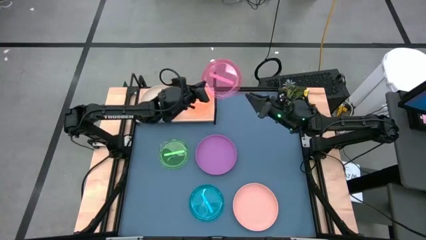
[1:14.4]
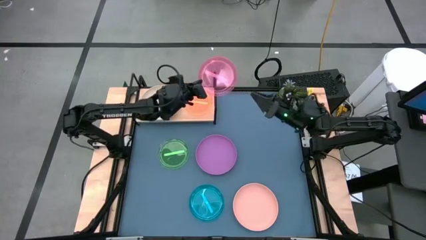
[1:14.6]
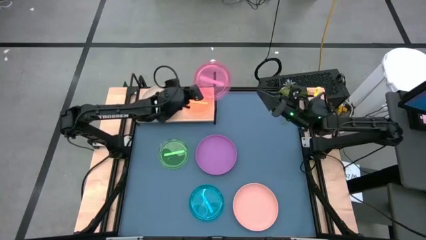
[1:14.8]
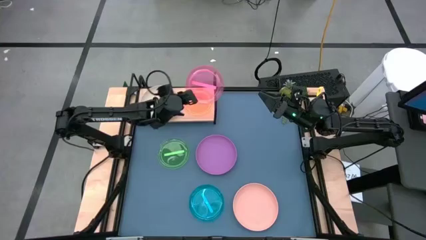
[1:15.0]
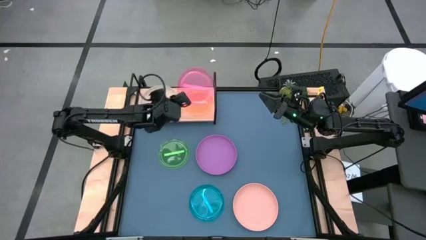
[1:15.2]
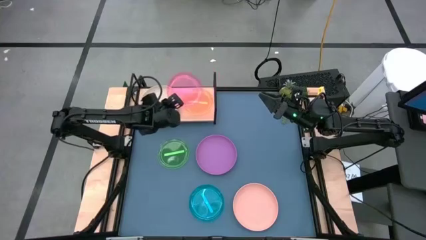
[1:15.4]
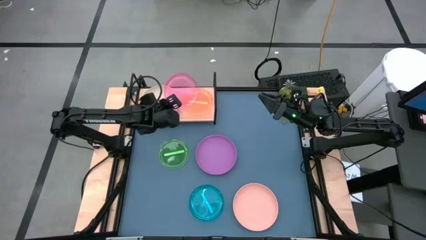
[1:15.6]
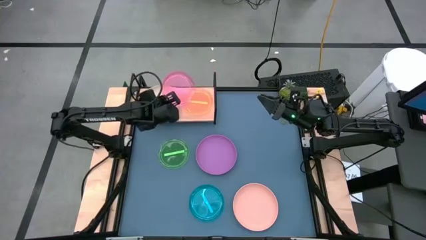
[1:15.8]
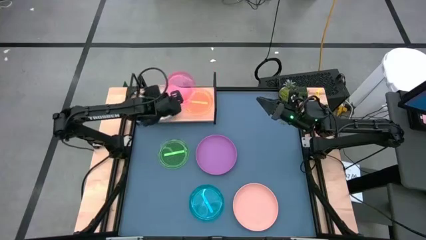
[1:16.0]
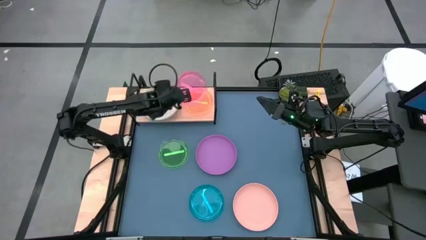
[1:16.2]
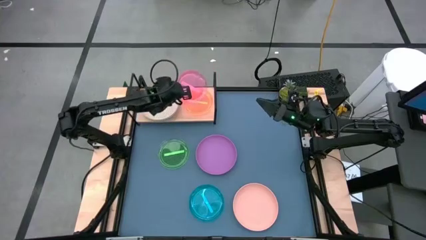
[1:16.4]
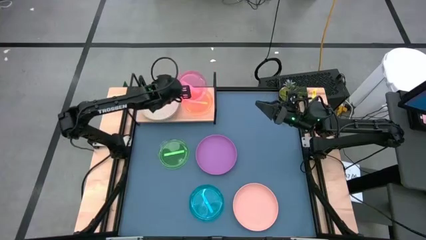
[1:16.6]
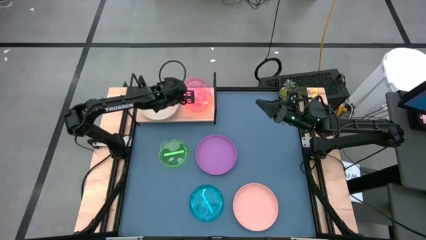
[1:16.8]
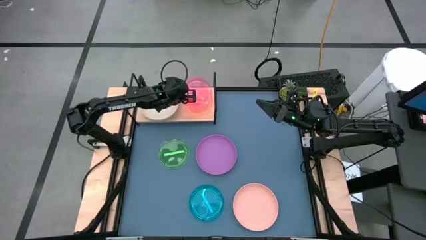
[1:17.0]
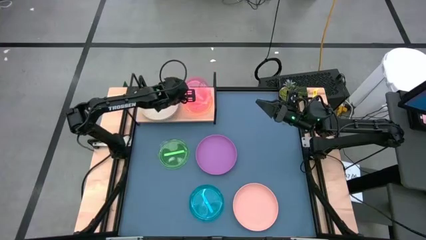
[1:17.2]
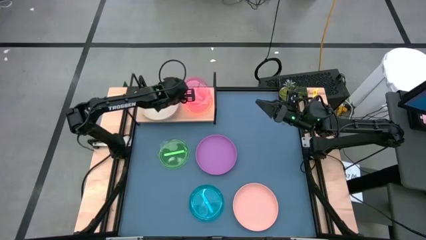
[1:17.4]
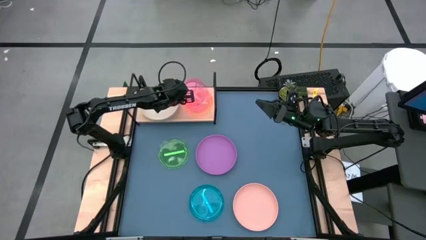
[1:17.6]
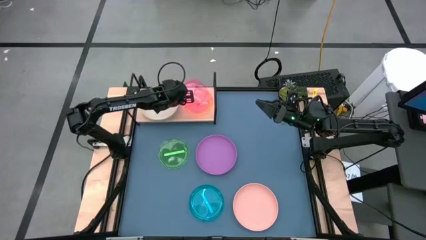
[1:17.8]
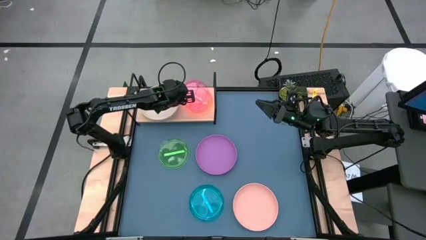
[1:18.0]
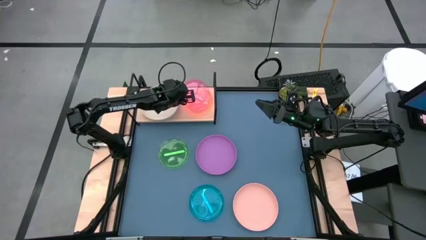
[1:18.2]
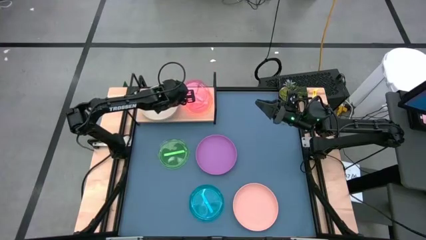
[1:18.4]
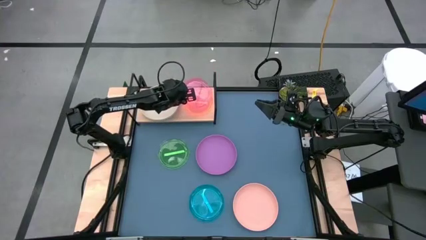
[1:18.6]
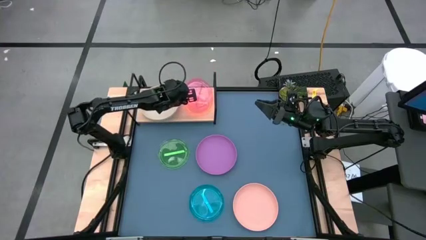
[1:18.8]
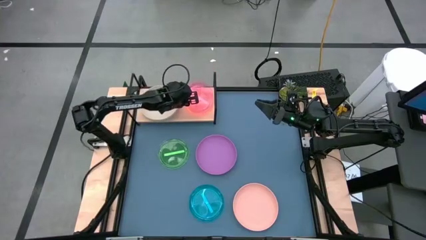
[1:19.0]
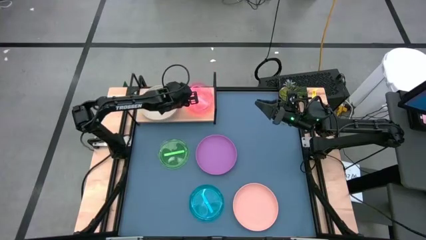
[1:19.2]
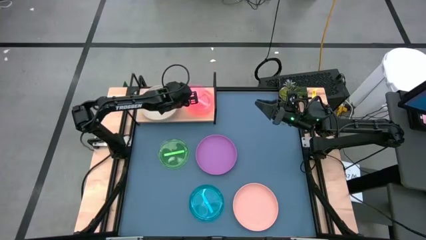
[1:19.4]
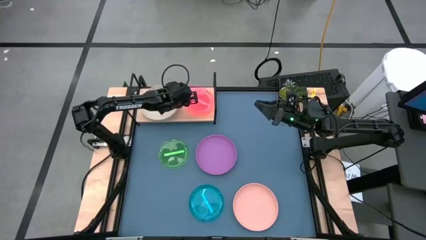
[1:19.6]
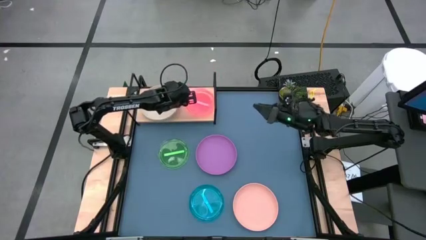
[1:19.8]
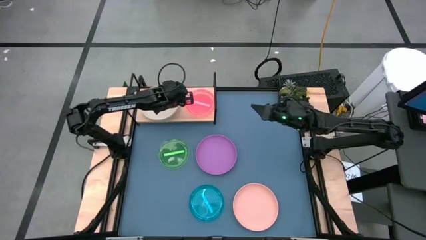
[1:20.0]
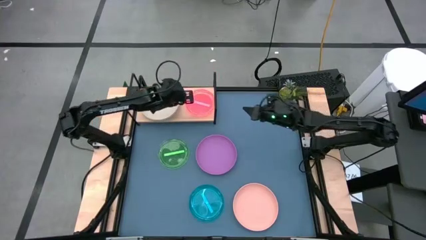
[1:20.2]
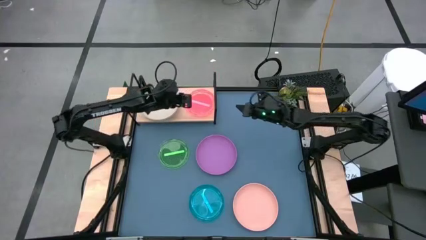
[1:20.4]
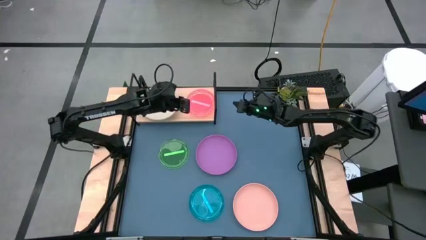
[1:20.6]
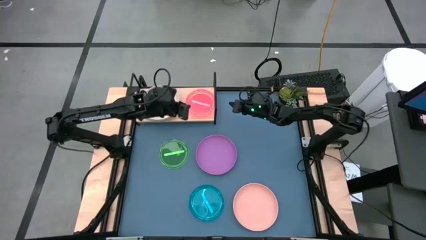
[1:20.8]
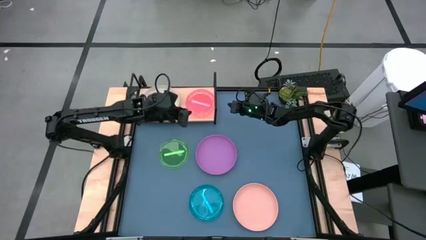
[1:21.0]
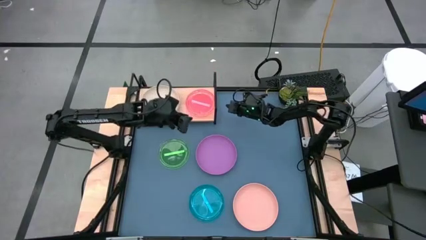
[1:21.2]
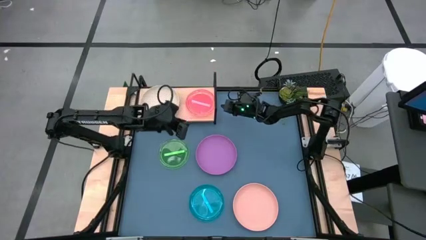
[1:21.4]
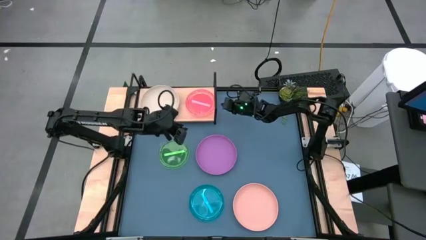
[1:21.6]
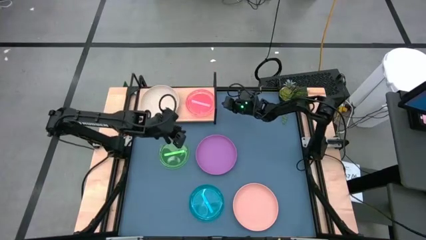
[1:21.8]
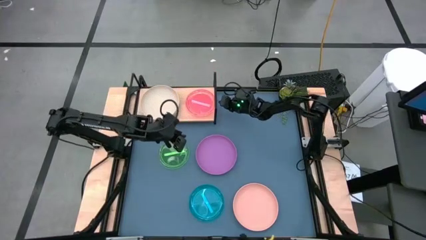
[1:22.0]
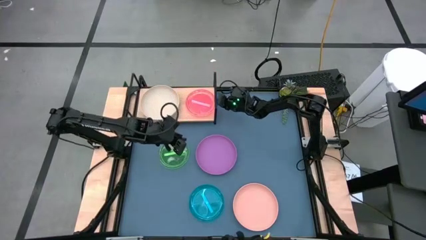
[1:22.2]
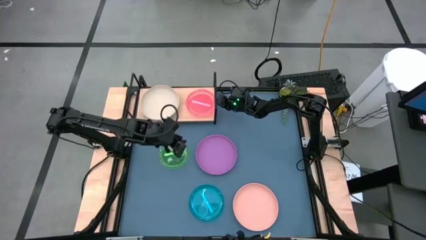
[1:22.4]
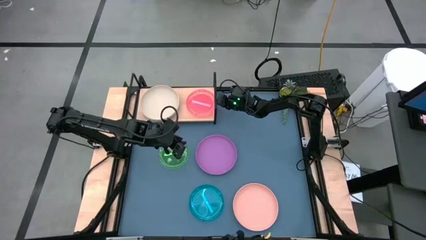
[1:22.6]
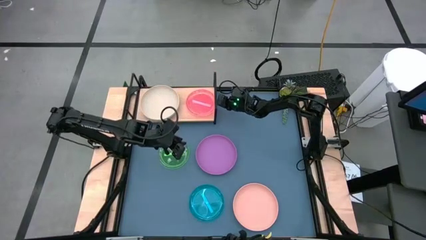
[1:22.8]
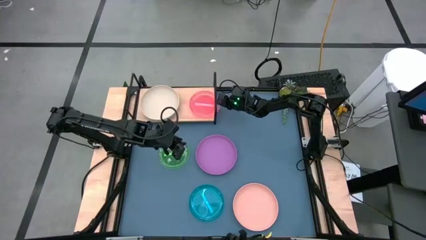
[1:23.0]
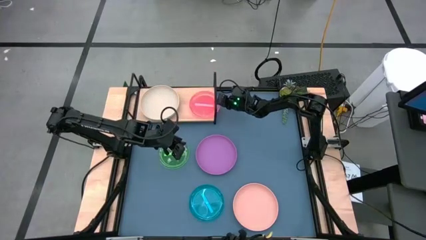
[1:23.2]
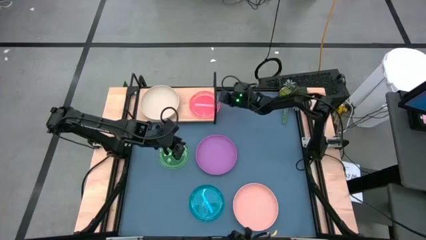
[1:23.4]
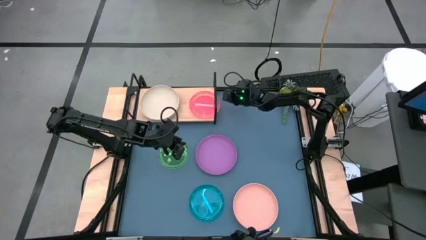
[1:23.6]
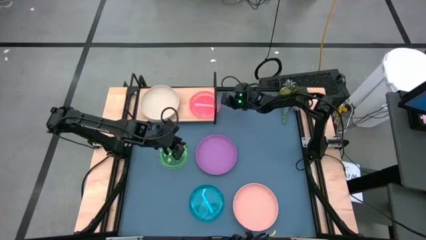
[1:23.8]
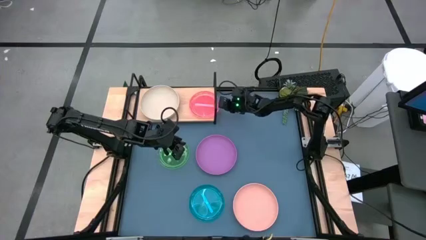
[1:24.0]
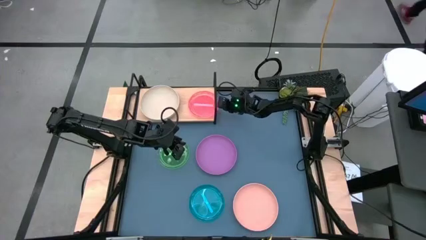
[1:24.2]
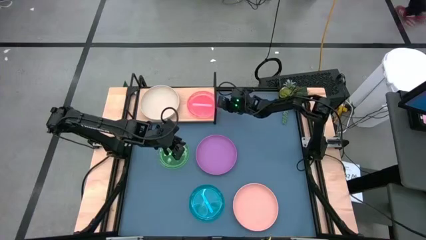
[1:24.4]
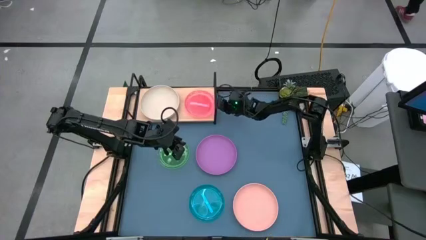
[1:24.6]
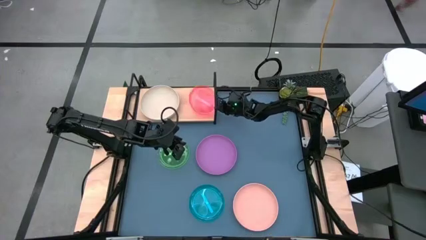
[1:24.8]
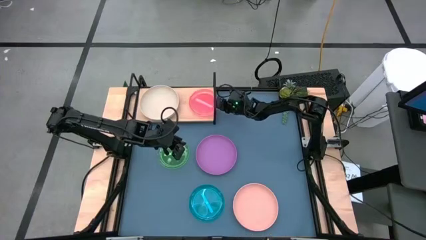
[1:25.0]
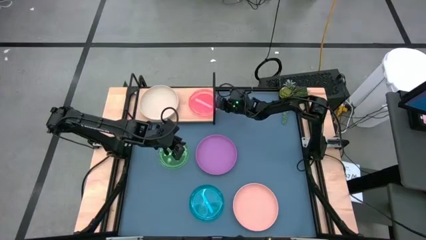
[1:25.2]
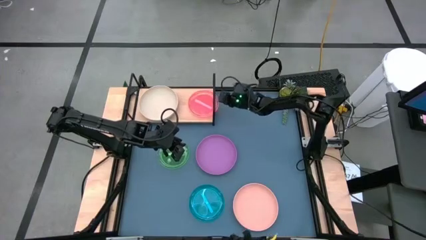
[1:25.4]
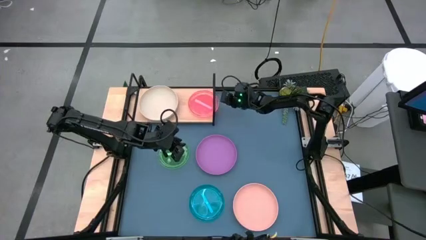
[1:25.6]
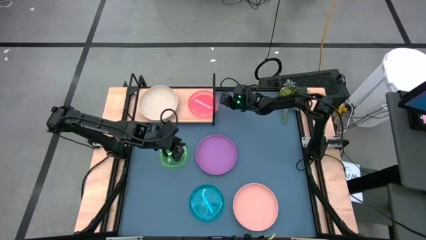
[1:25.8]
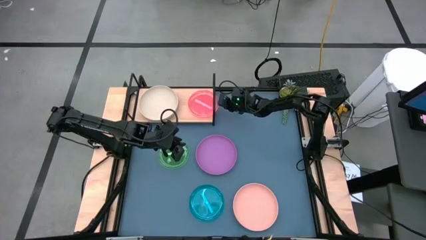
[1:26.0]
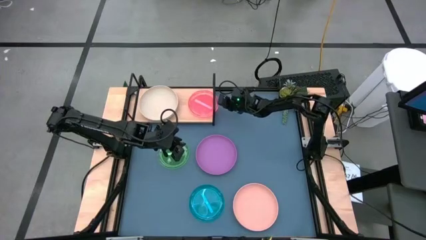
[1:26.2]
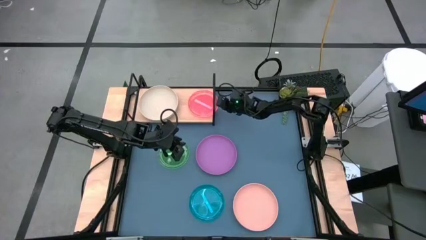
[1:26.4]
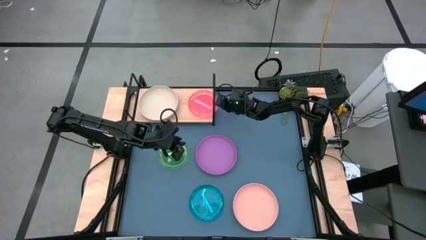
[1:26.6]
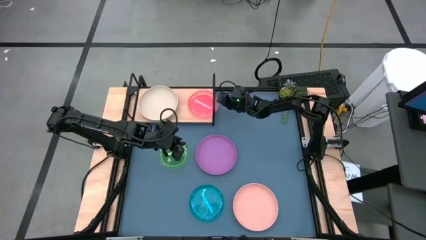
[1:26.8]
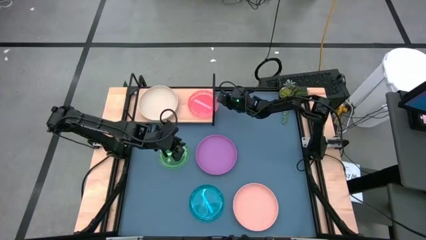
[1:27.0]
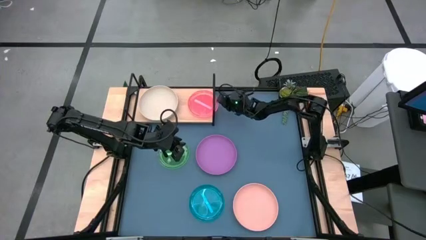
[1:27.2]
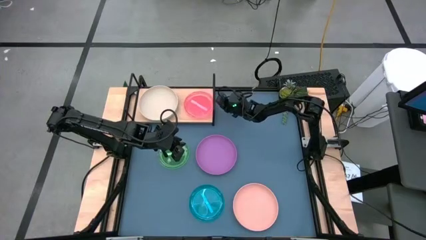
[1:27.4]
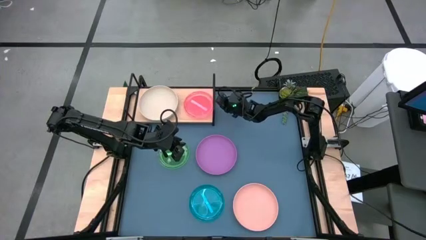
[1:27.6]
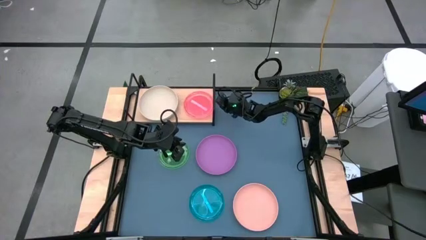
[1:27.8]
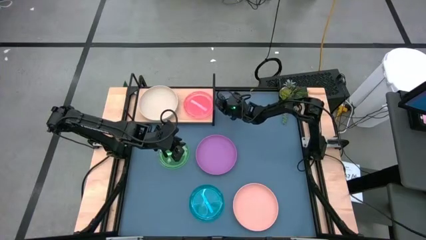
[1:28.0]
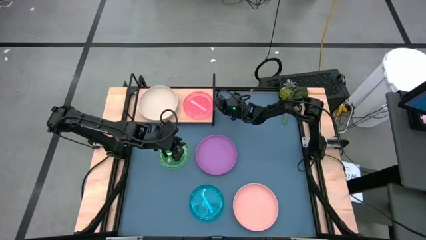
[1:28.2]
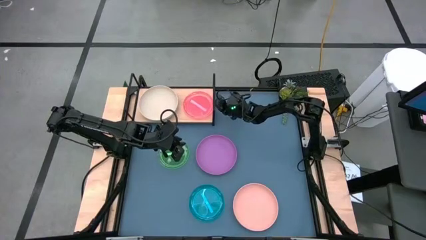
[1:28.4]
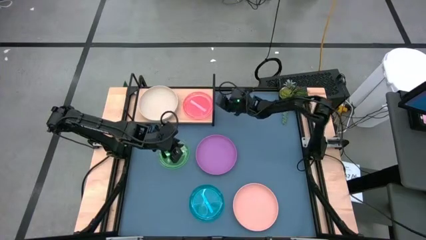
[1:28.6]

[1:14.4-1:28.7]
Task: Place and stack plates onto a shelf
Stack the pink plate on top of the orange plate on the shelf

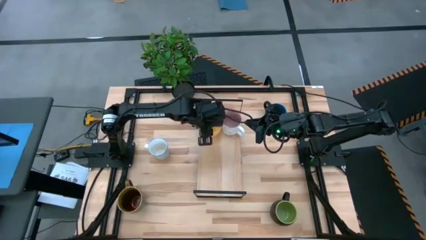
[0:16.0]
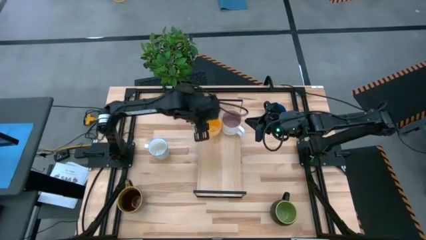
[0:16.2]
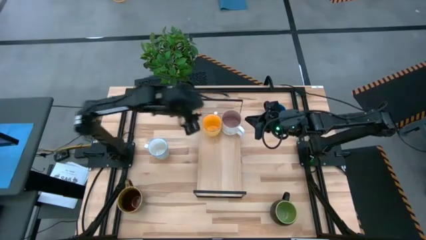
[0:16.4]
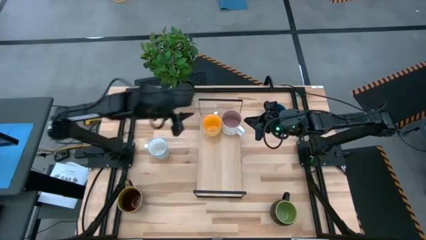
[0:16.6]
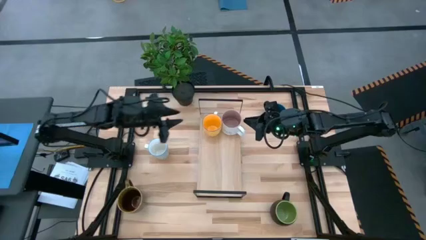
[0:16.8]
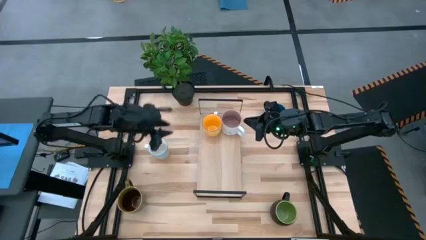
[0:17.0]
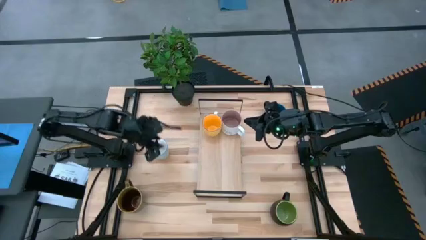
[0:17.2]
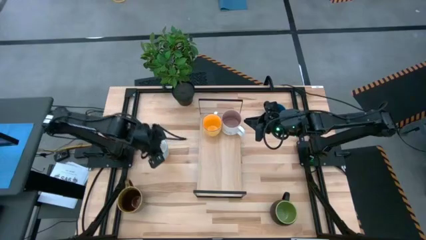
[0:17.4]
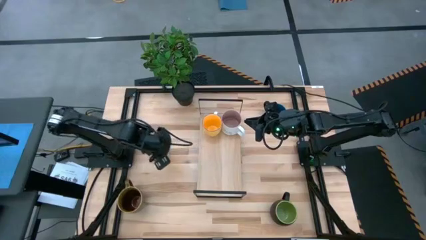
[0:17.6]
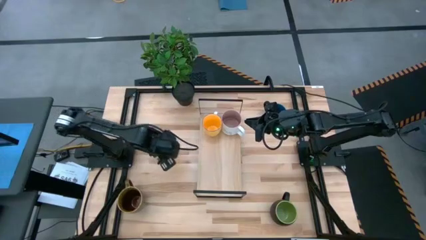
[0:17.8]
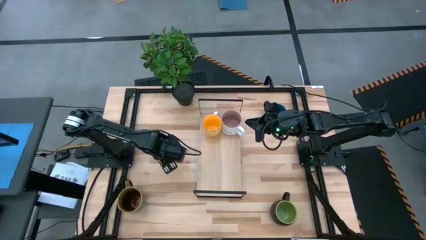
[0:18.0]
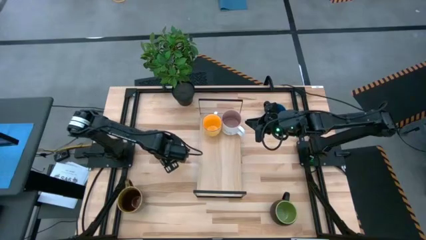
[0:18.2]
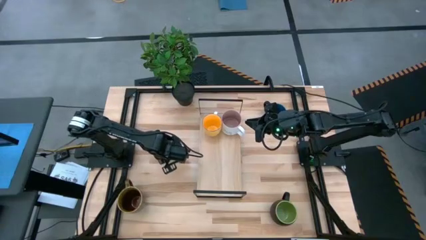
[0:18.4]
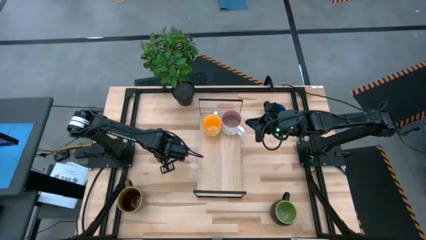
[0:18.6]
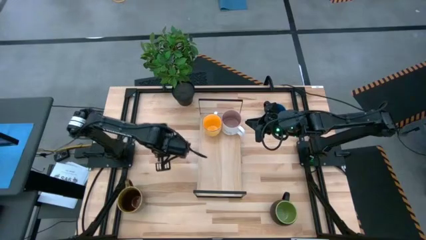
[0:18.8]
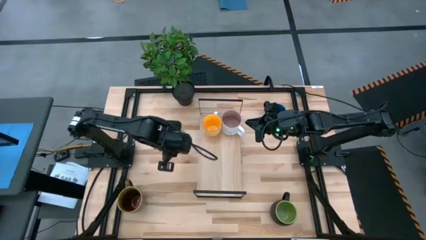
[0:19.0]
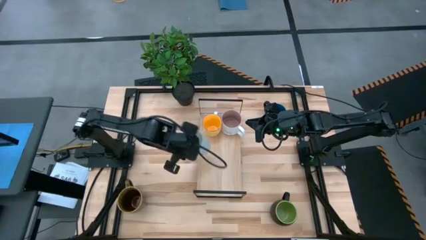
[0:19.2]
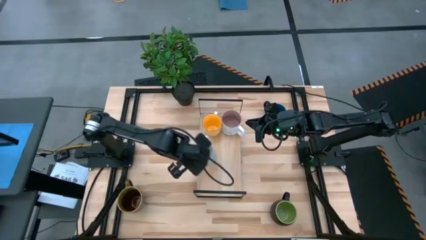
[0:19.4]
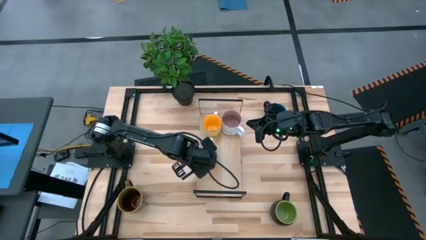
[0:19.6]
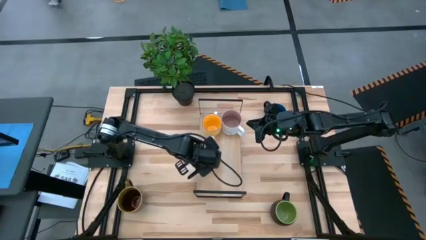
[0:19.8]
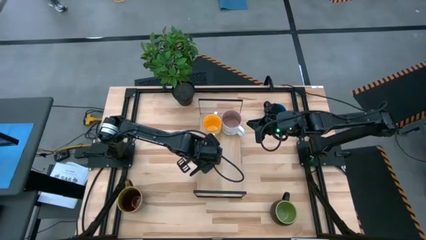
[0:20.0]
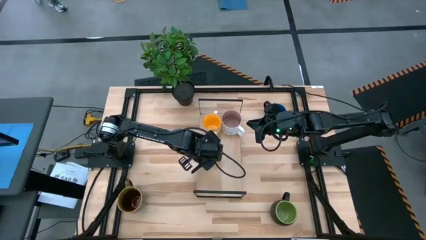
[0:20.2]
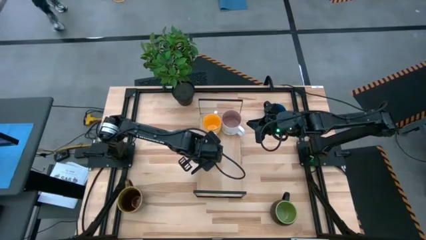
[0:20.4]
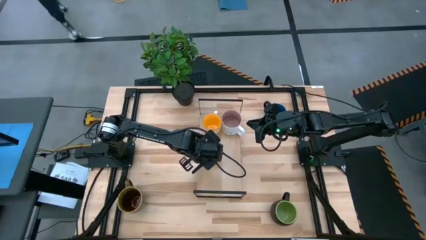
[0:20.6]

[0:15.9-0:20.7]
Task: Place coffee mugs
Put the white blue mug on the shelf
